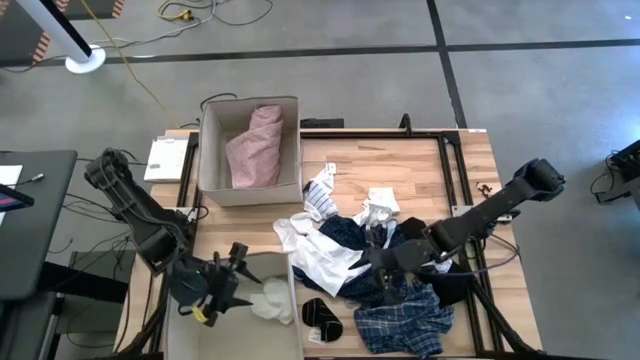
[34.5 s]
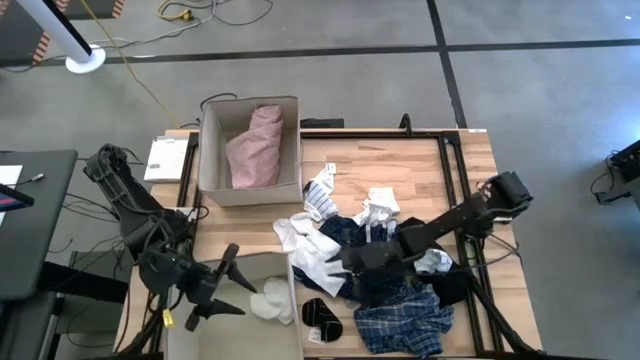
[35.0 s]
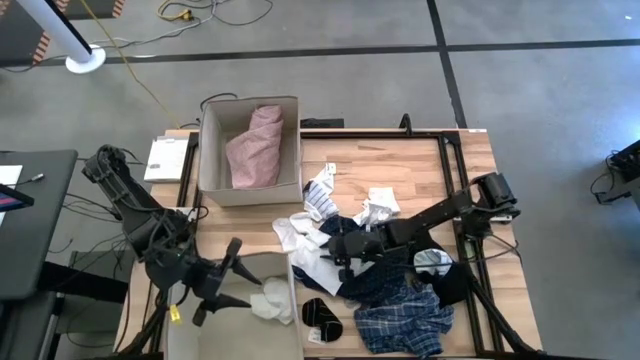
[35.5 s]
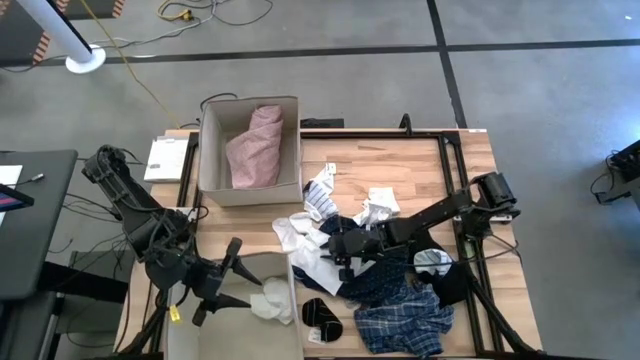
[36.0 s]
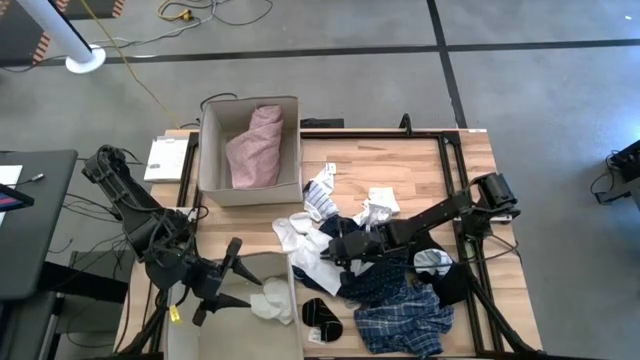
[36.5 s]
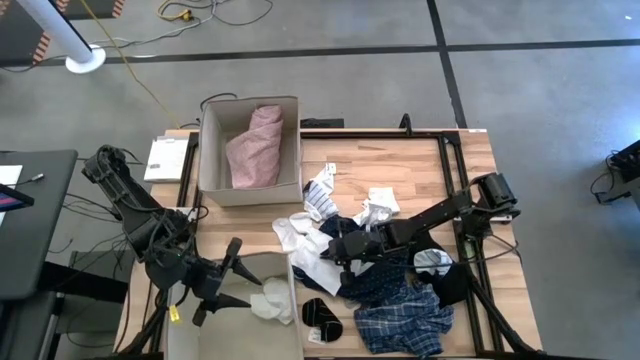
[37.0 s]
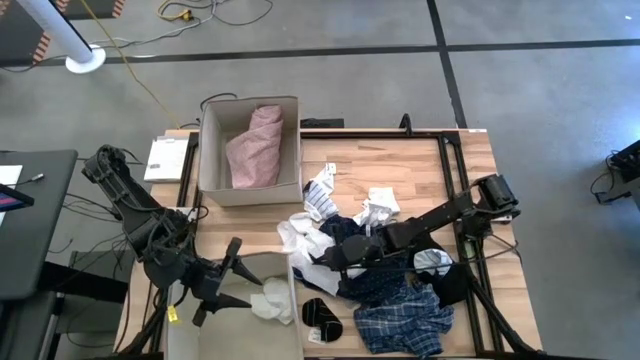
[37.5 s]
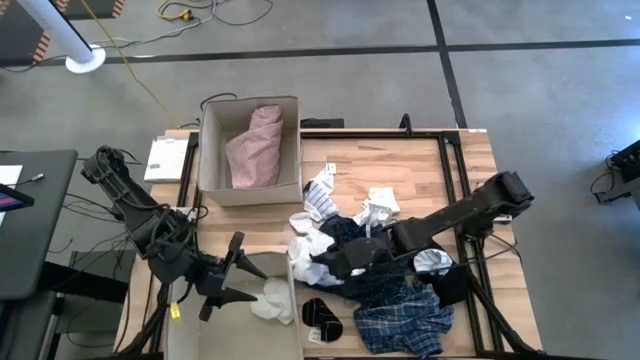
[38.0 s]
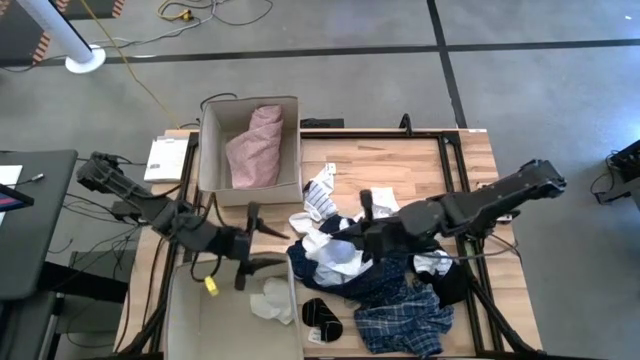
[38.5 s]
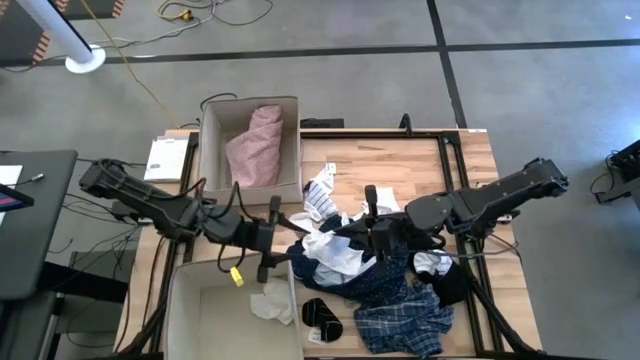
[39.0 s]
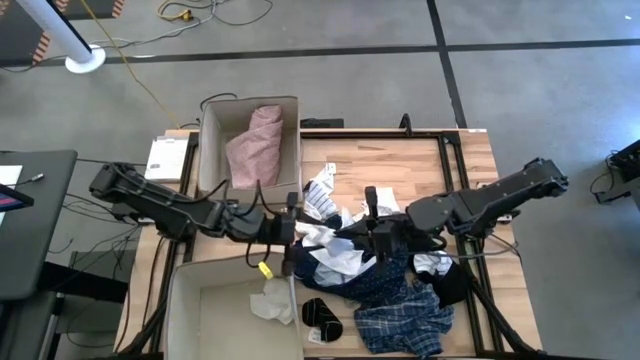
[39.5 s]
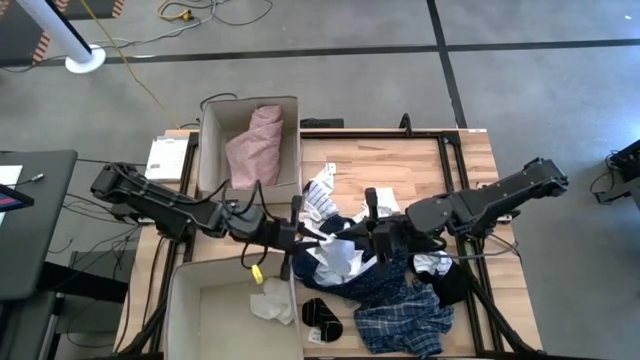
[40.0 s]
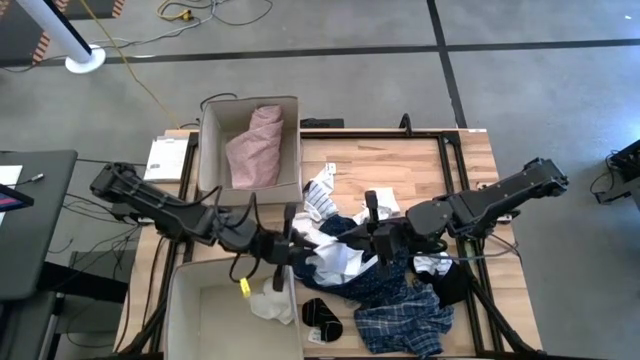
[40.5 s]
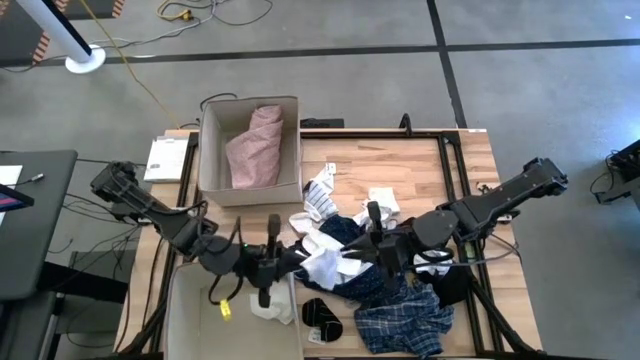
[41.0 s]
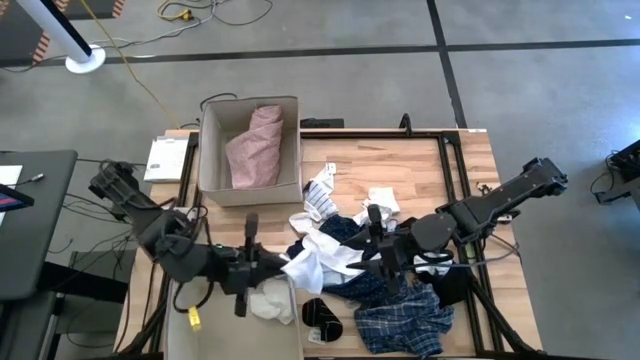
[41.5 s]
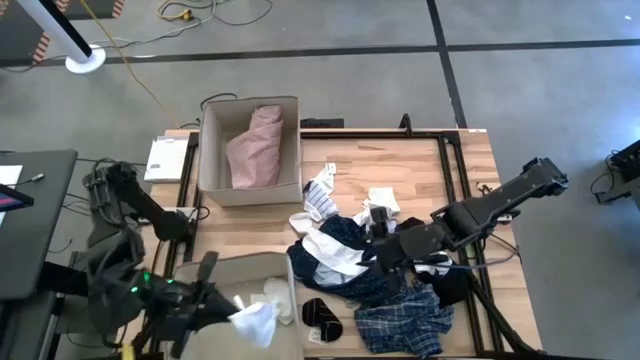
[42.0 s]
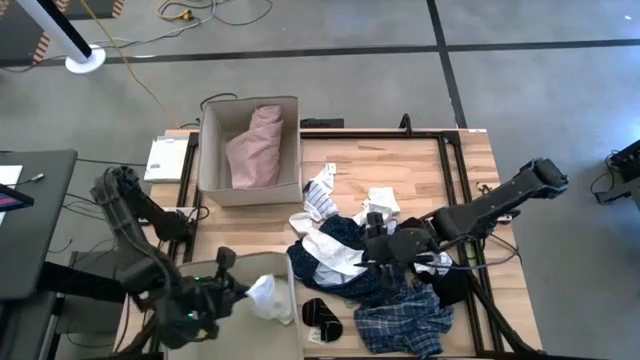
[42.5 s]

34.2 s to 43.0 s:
Task: Sort clothes
Put the white sock into the bottom light brown laundry organizer

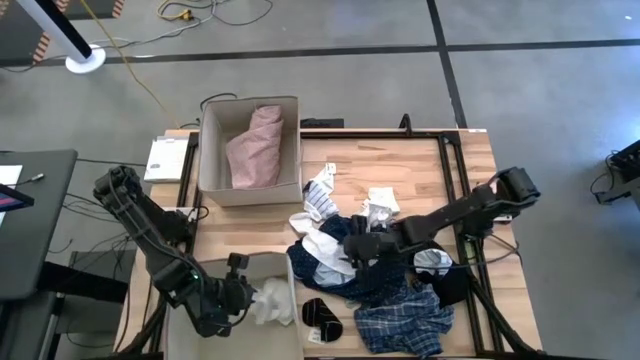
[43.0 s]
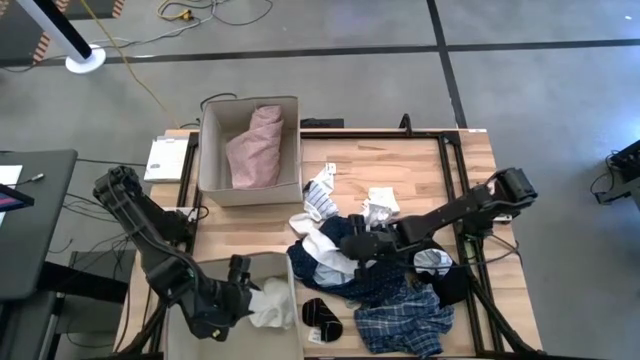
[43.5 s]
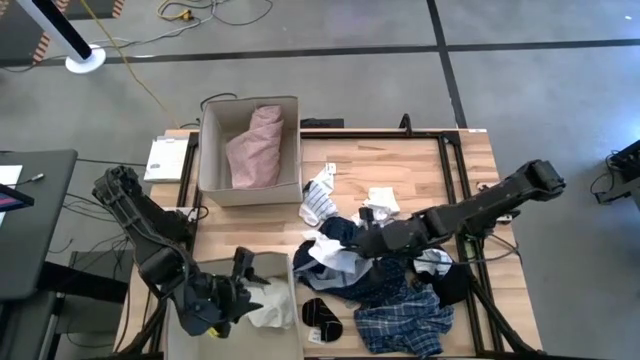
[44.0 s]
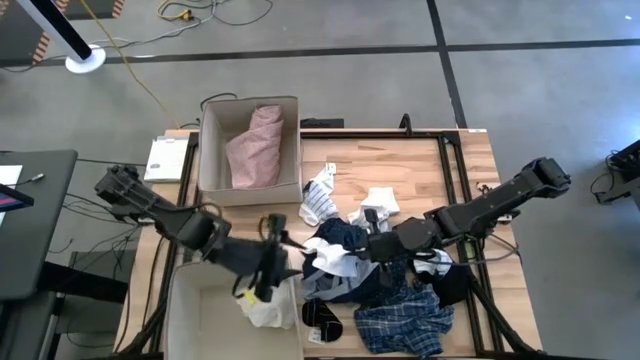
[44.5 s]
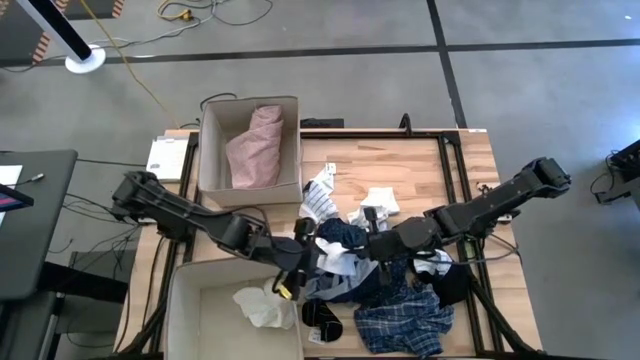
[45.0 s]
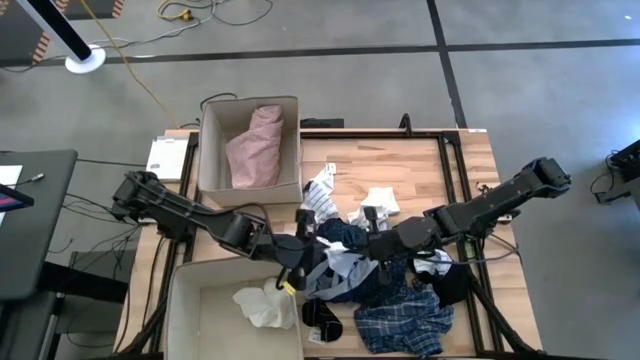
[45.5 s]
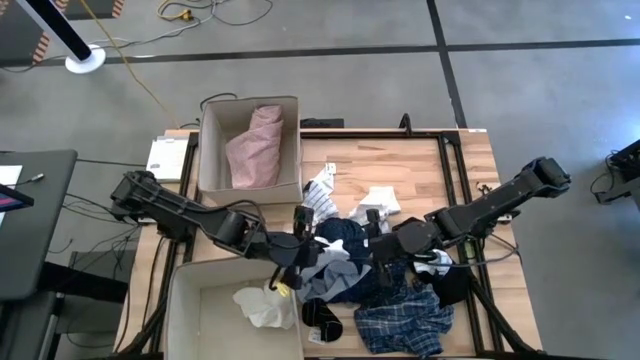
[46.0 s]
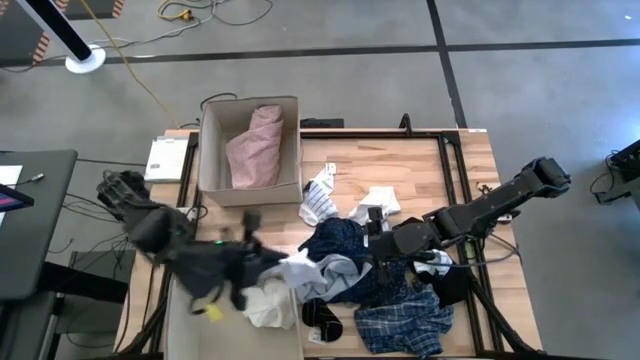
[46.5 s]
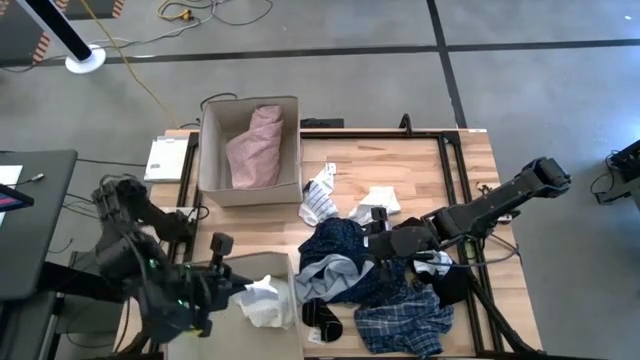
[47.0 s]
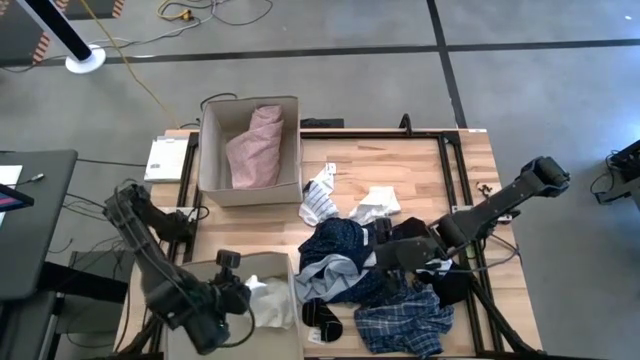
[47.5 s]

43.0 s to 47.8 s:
Put the white sock into the bottom light brown laundry organizer

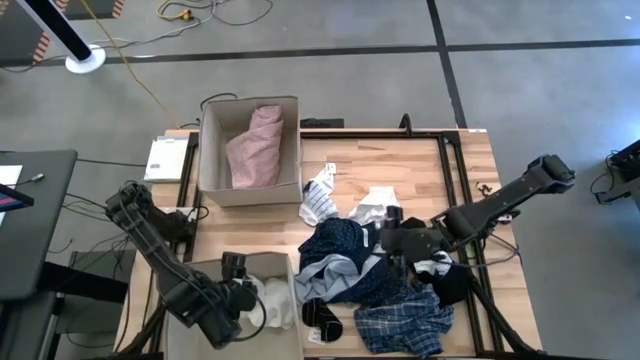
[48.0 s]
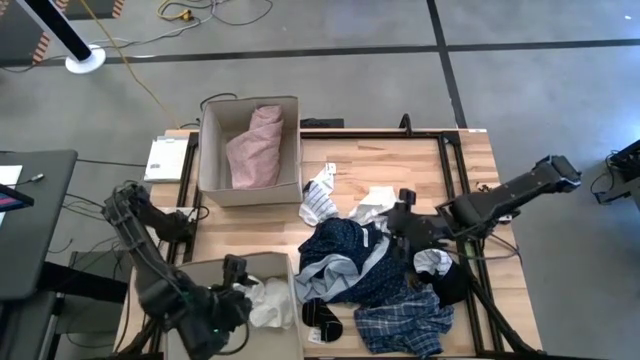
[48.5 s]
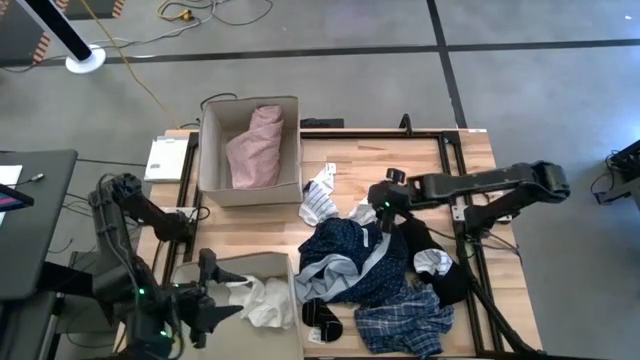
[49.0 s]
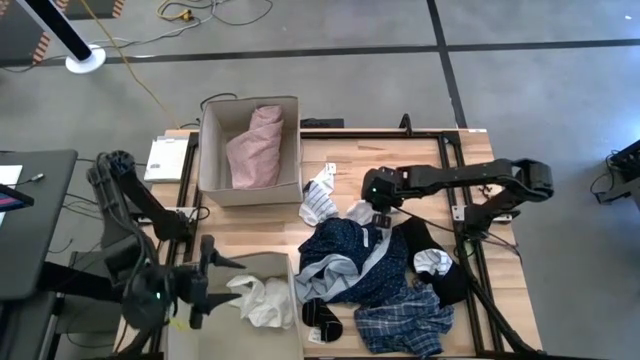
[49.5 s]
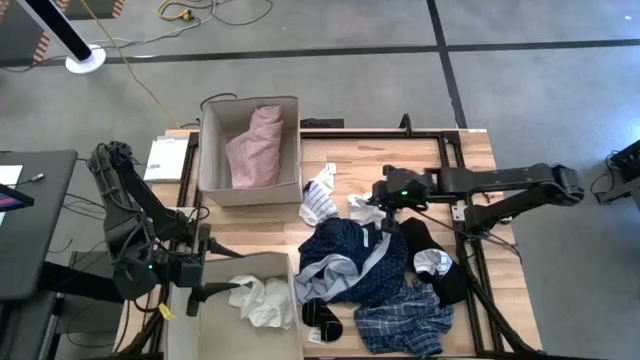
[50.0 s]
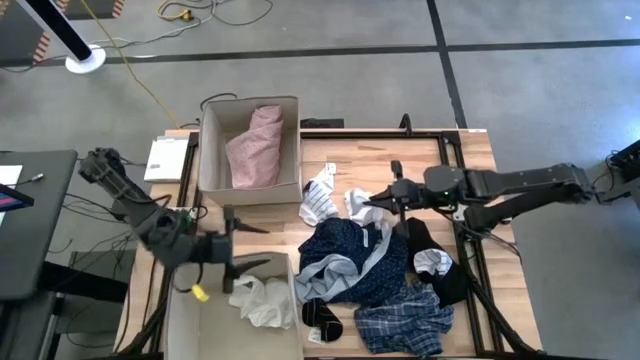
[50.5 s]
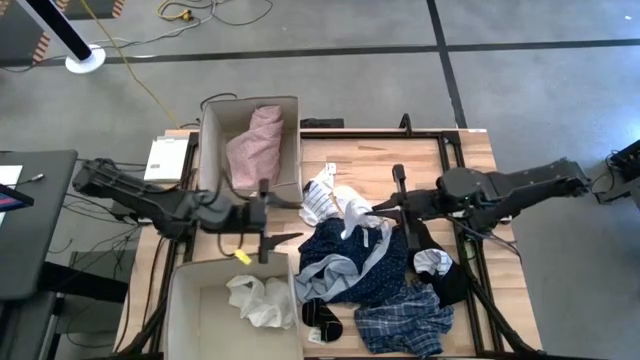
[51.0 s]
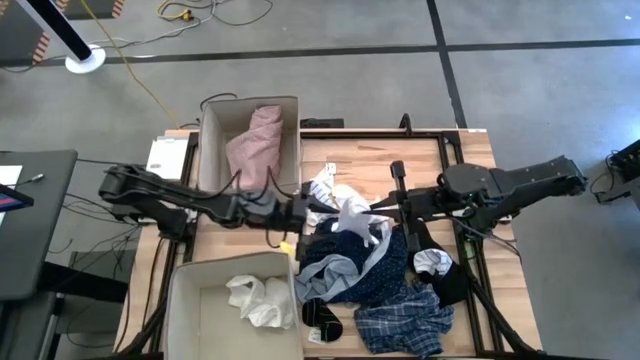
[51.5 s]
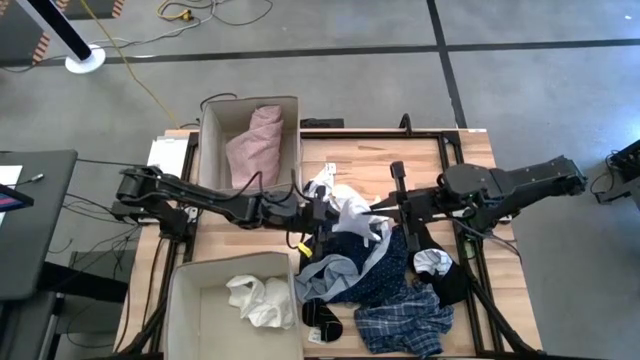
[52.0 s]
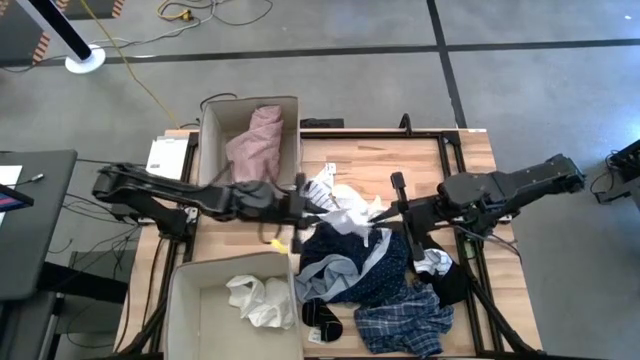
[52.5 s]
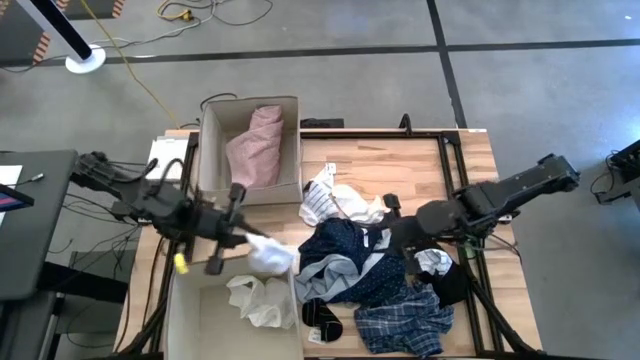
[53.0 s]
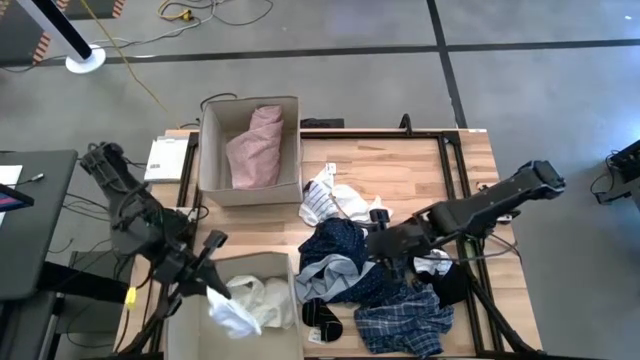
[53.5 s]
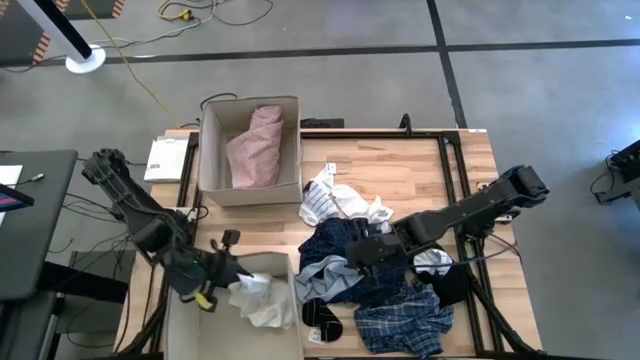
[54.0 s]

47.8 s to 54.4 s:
Put the bottom right white sock into the bottom light brown laundry organizer

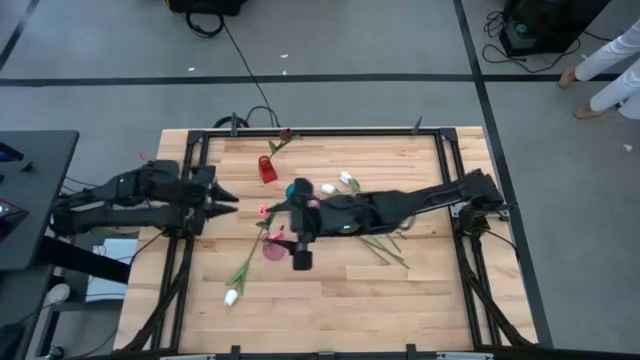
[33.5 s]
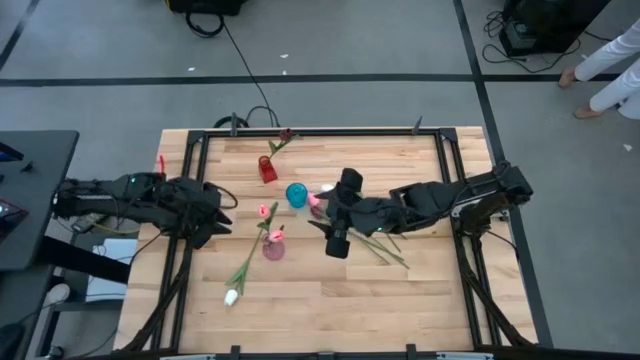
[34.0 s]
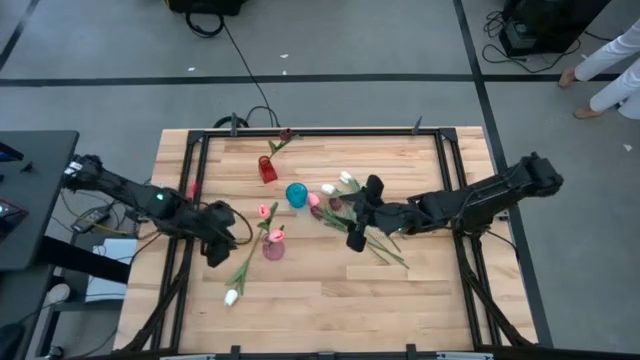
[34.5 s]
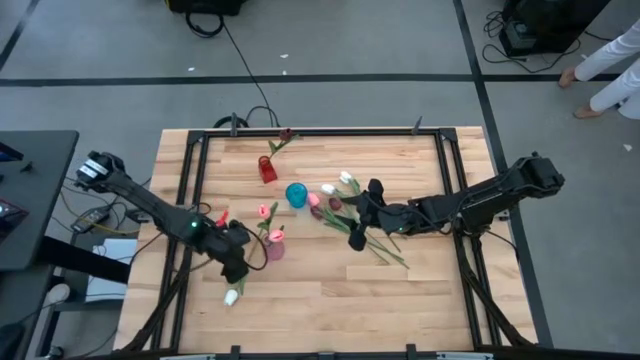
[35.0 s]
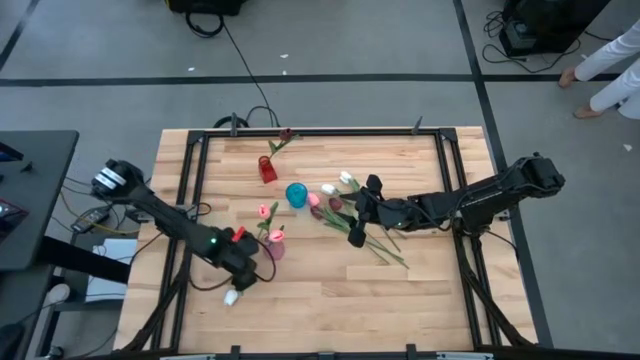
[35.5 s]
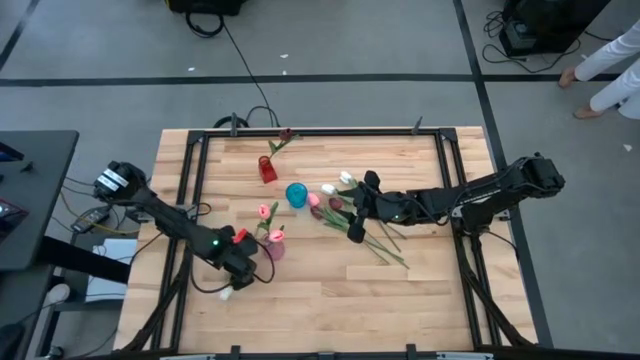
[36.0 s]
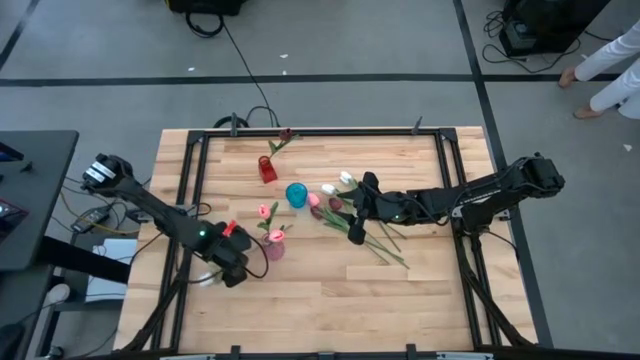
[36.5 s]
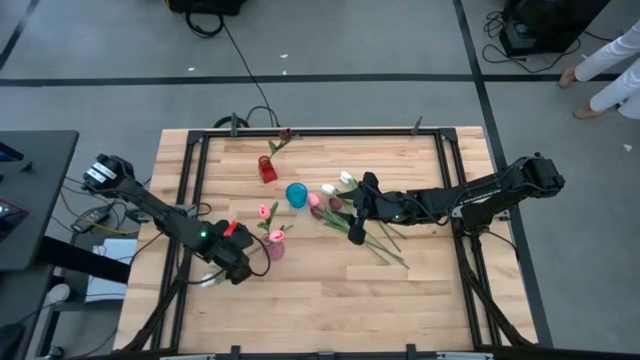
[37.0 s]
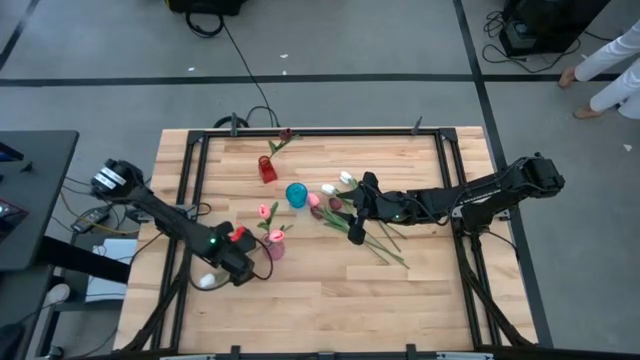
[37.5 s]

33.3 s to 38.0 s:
Task: Sort flowers into vase by color
Put the middle left white flower into the blue vase
